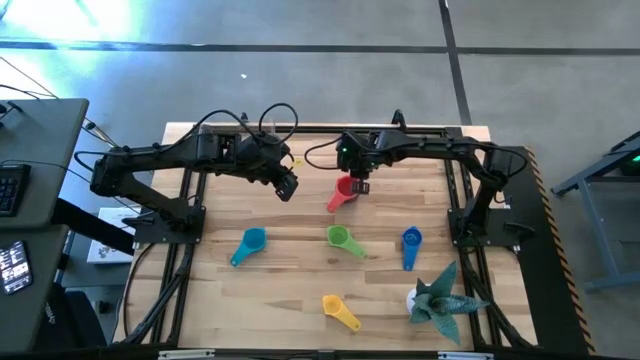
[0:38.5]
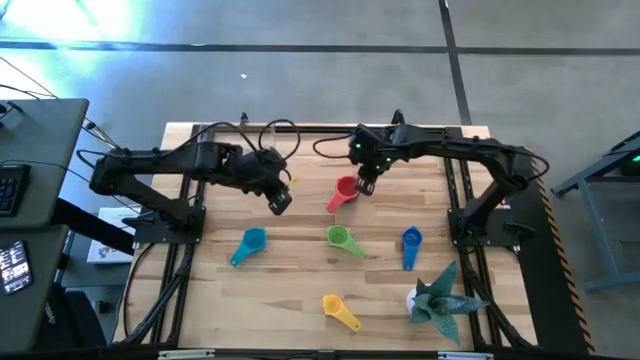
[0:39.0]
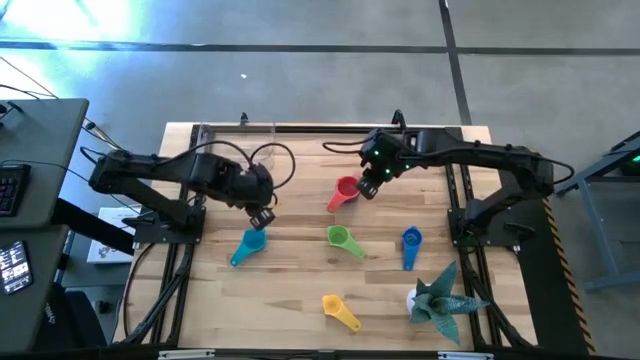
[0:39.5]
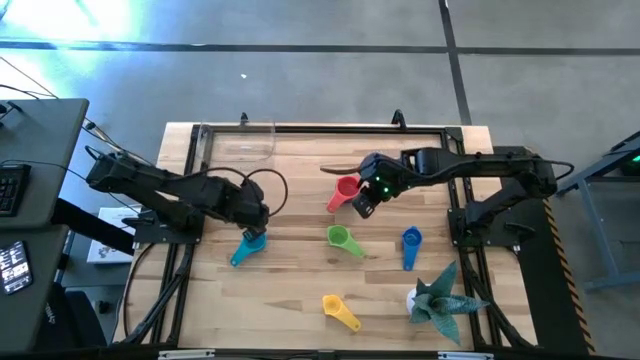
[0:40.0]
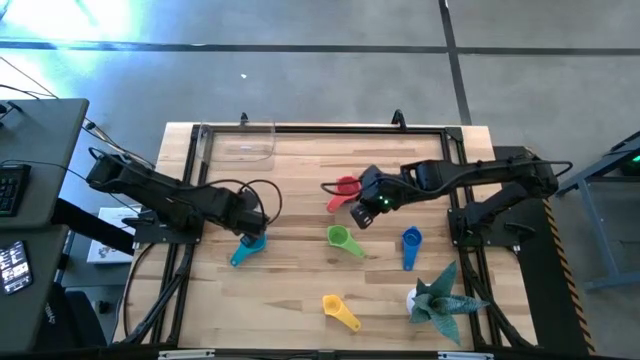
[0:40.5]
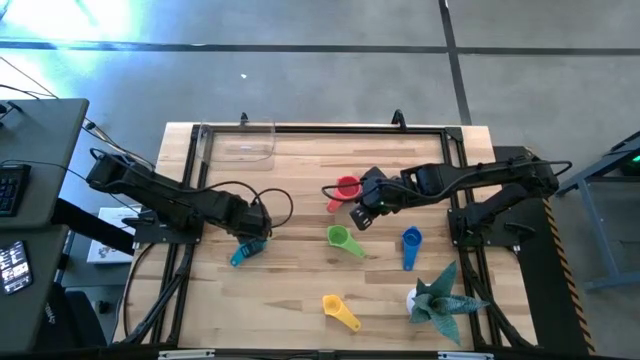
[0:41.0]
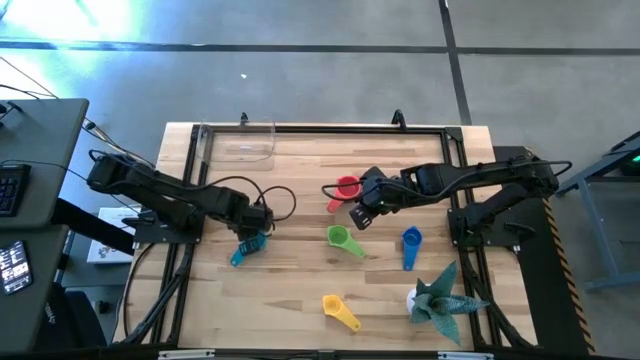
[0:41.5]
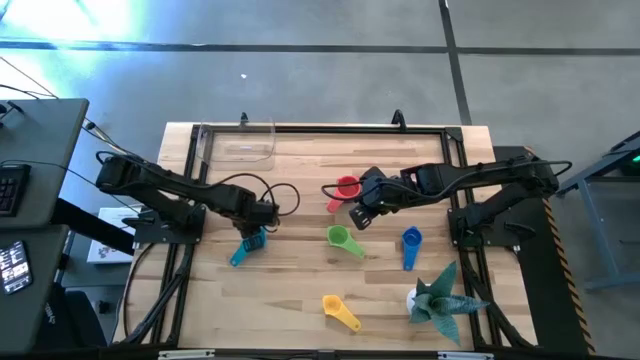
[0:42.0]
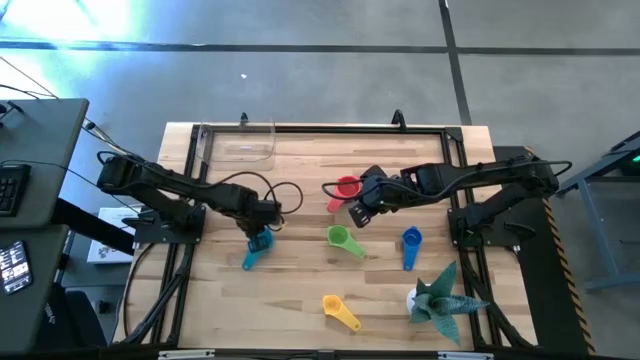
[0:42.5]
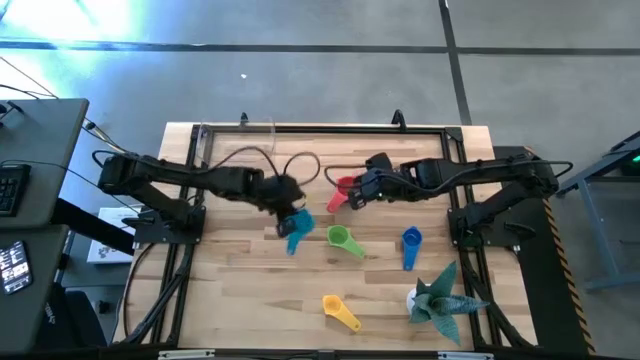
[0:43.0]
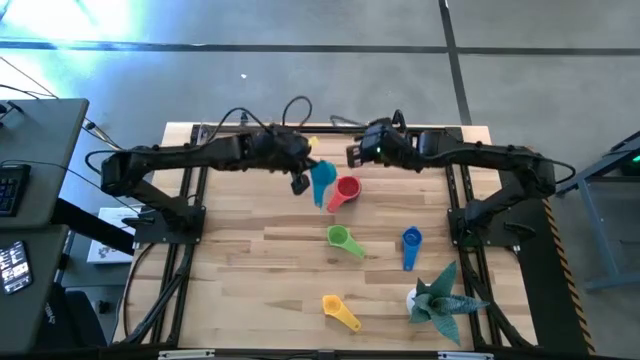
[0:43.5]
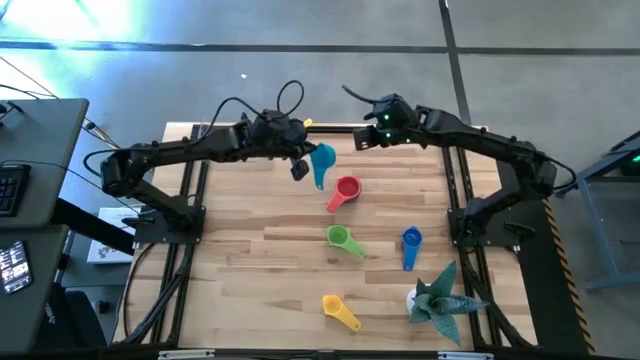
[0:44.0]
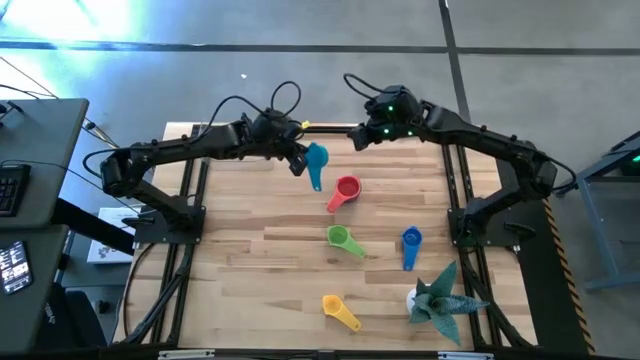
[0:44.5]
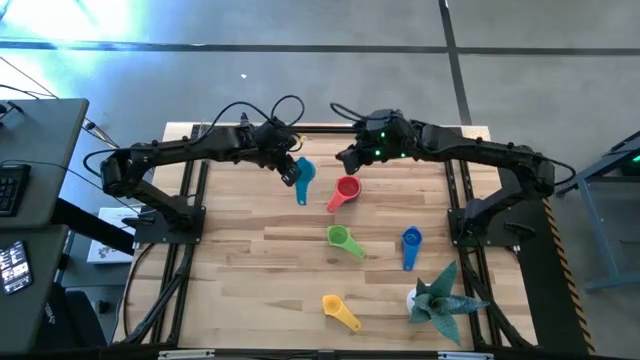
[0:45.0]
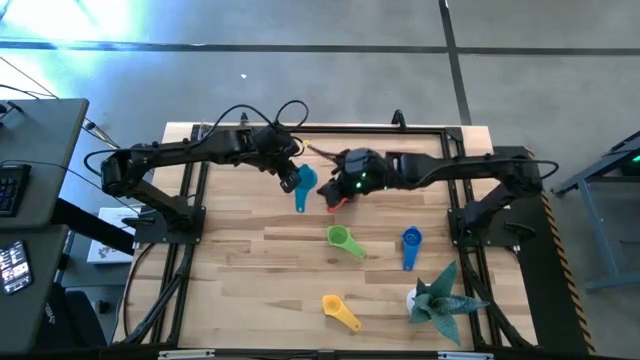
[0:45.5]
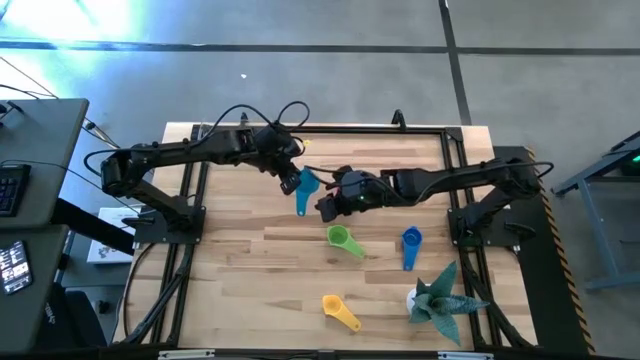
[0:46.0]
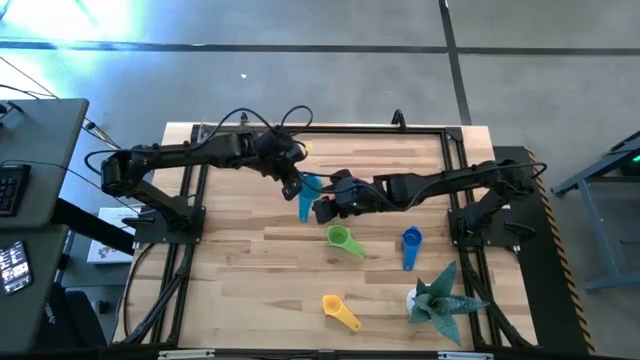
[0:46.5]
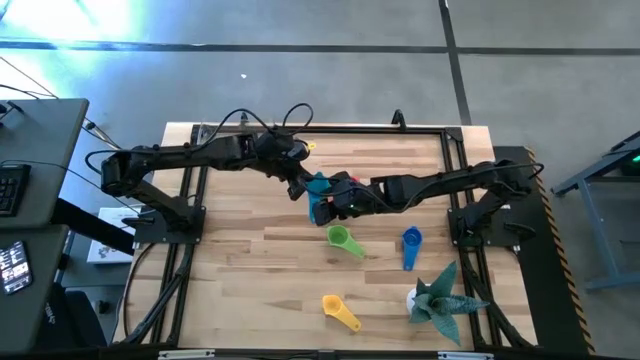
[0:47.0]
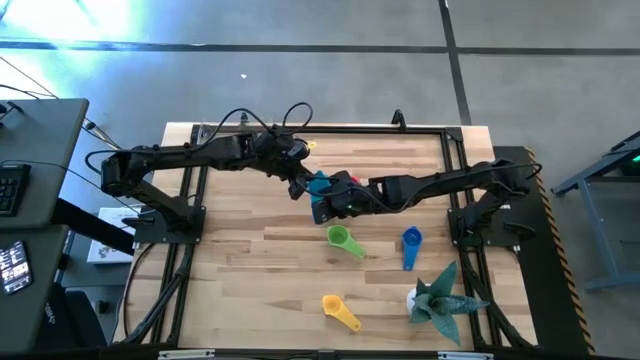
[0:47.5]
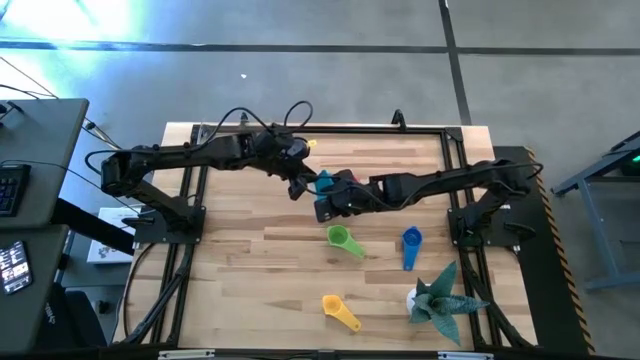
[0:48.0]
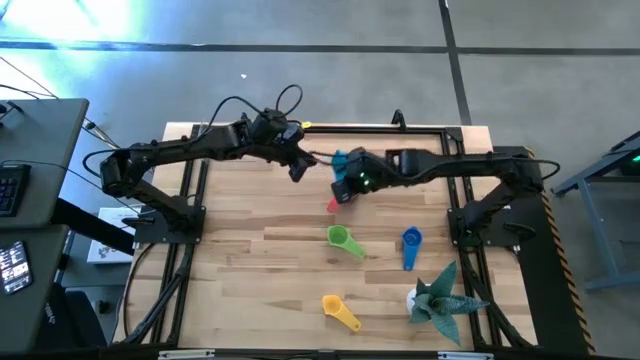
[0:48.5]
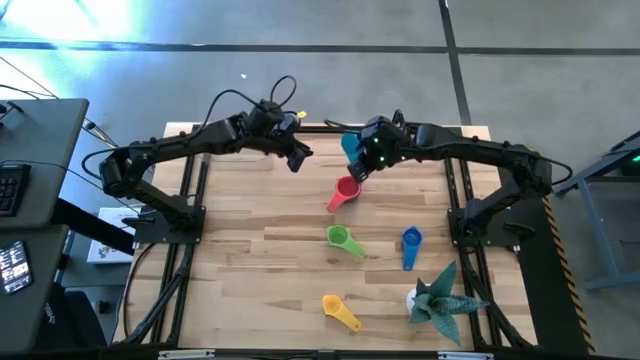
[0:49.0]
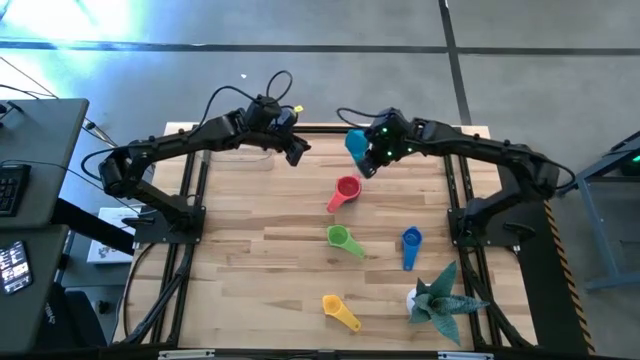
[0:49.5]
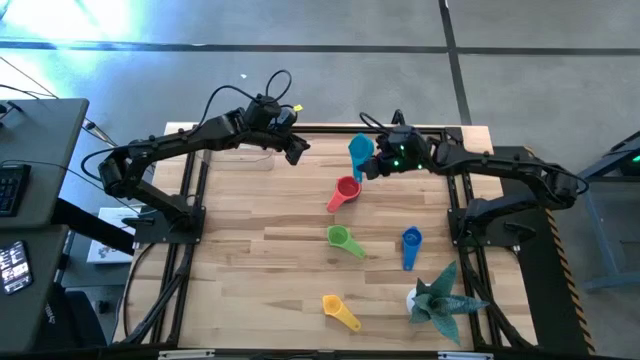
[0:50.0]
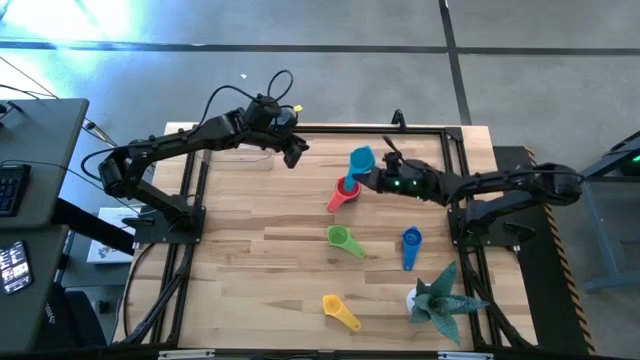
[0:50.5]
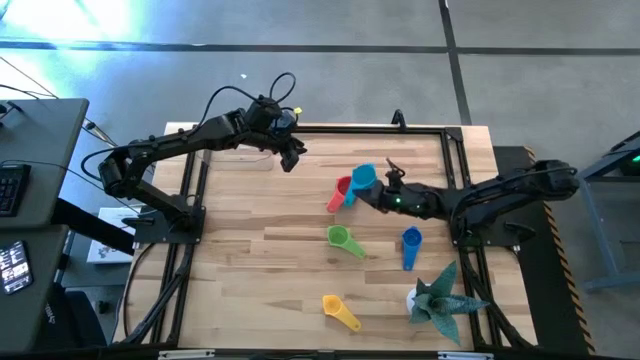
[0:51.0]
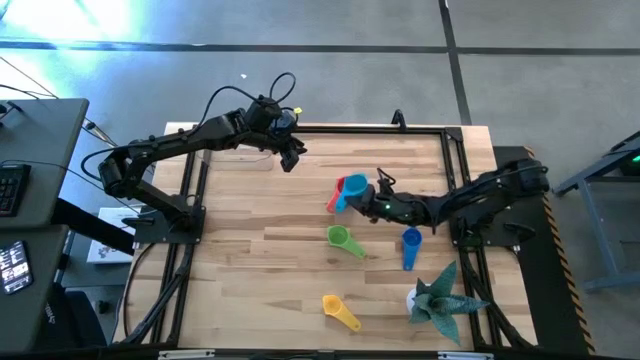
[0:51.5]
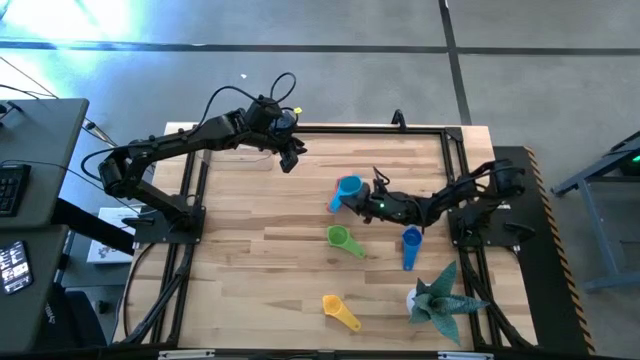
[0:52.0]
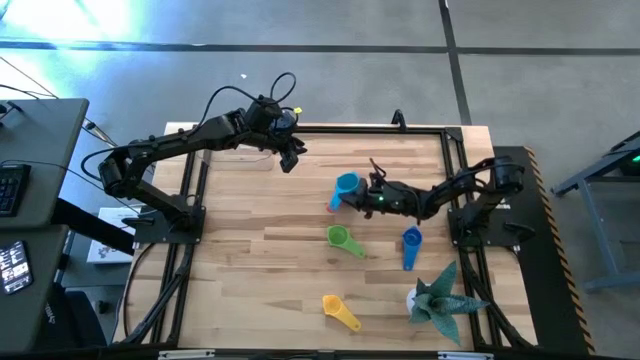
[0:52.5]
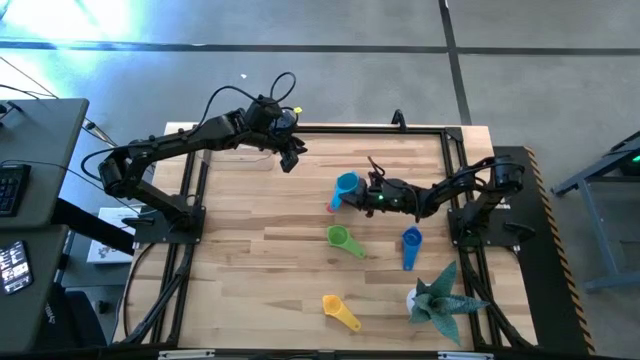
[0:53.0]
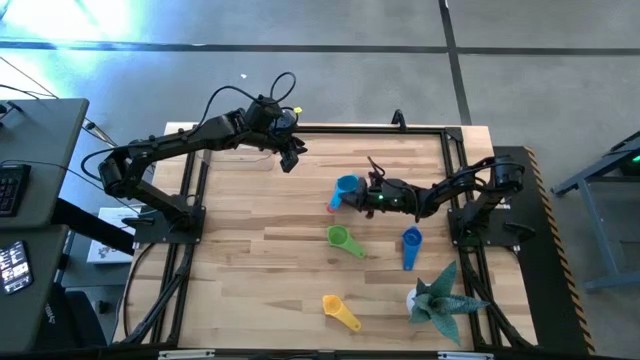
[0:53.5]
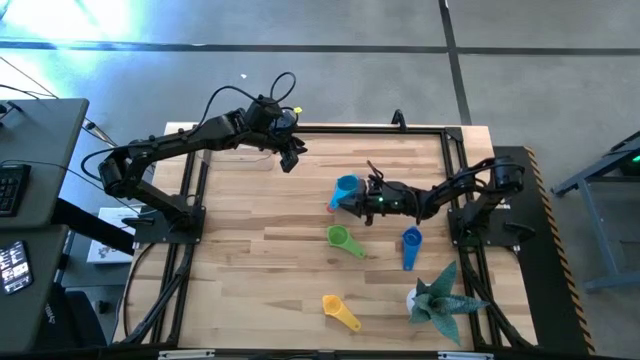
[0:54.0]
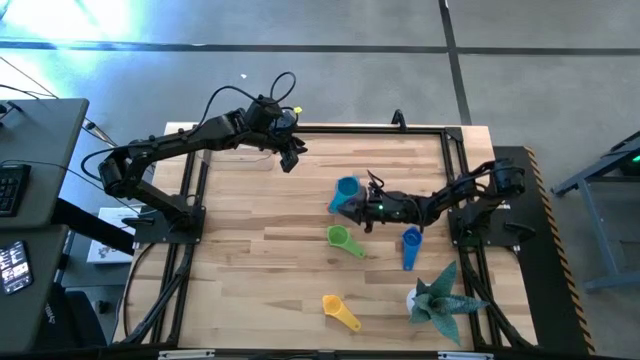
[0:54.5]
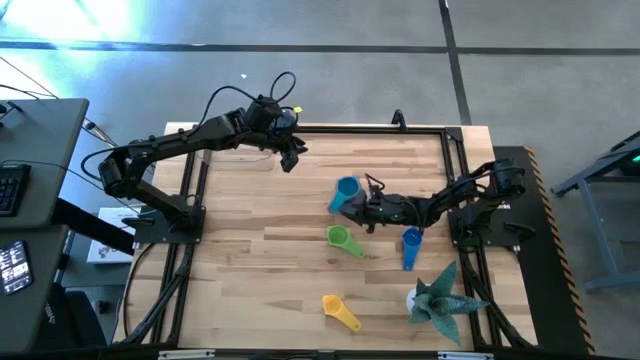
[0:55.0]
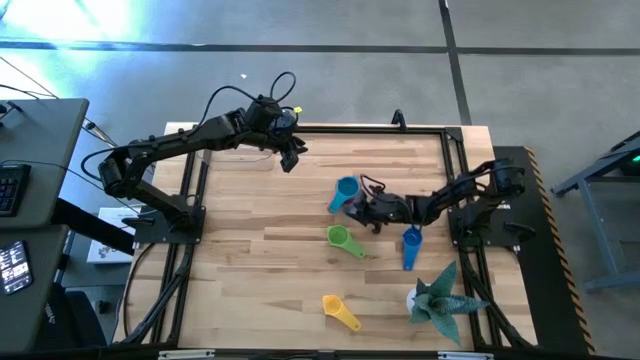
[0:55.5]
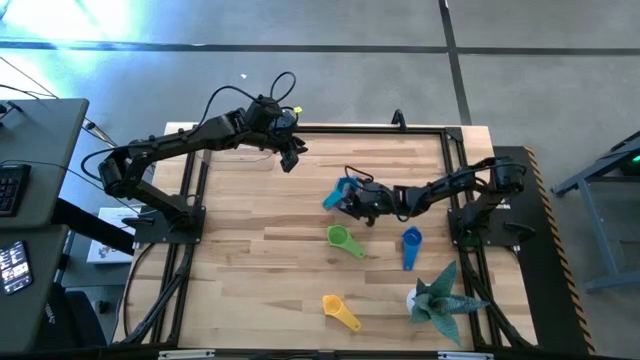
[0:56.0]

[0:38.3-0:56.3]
Task: Nest measuring cups in basket
Stack the light blue measuring cup on top of the red measuring cup on the table
